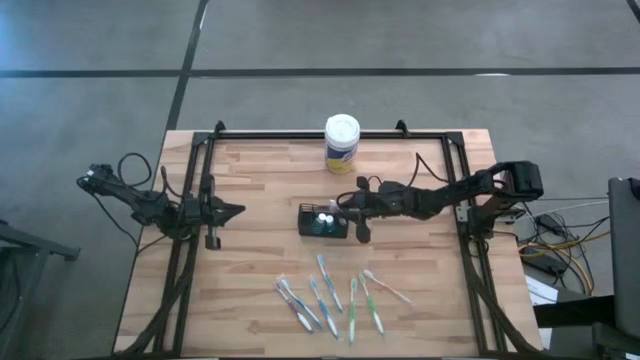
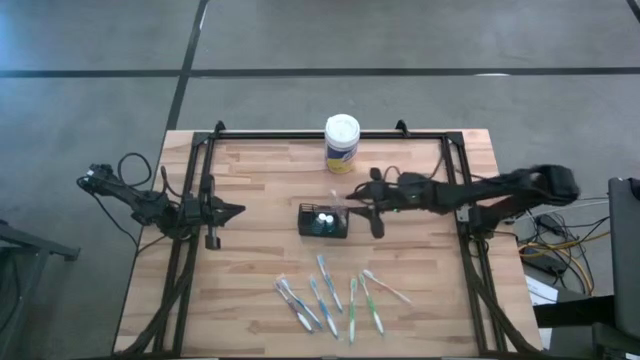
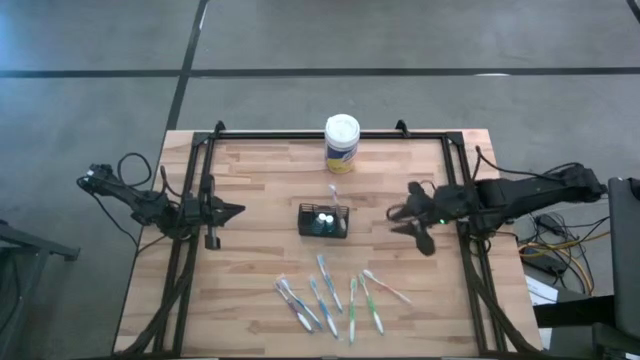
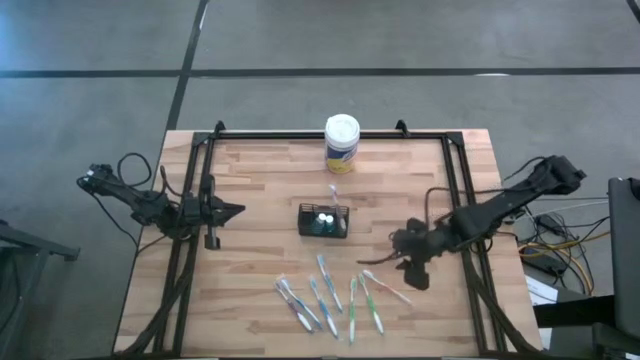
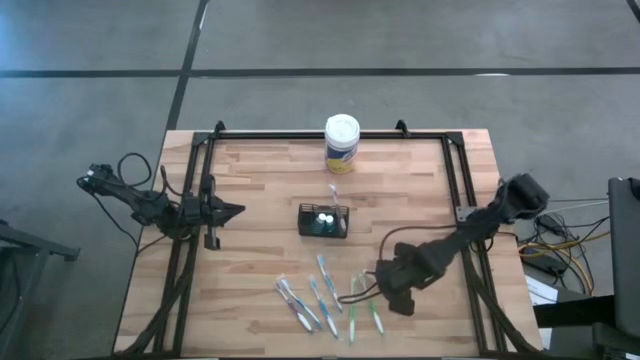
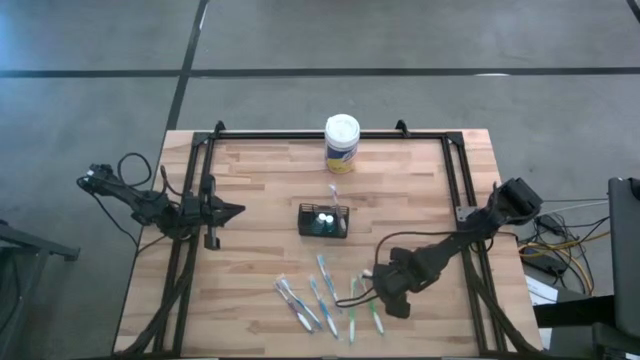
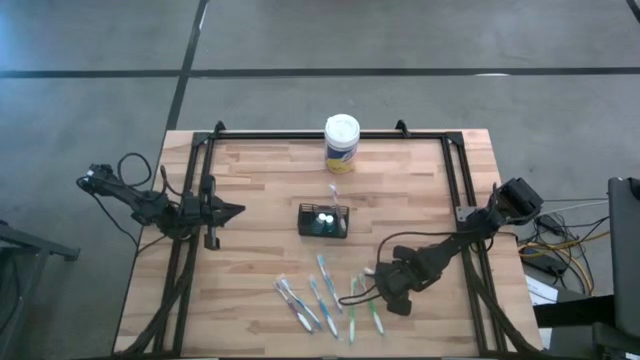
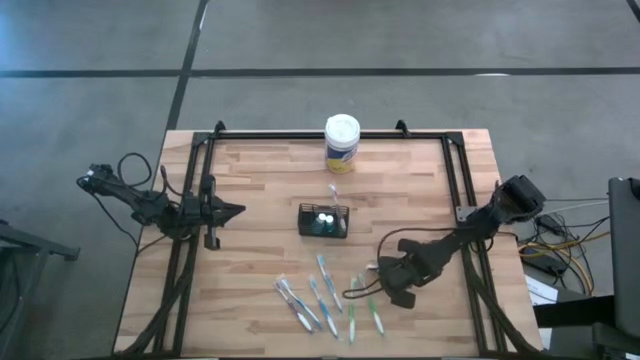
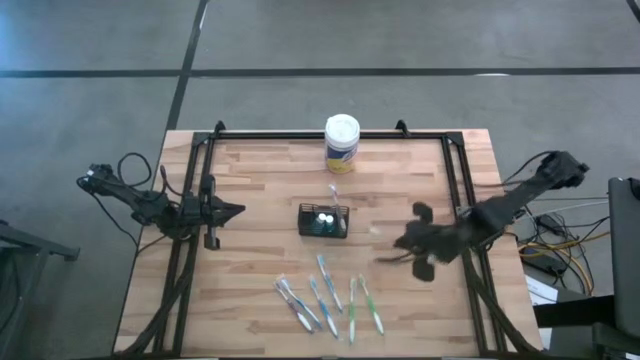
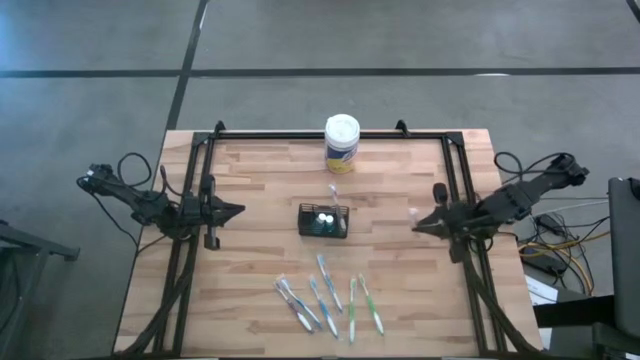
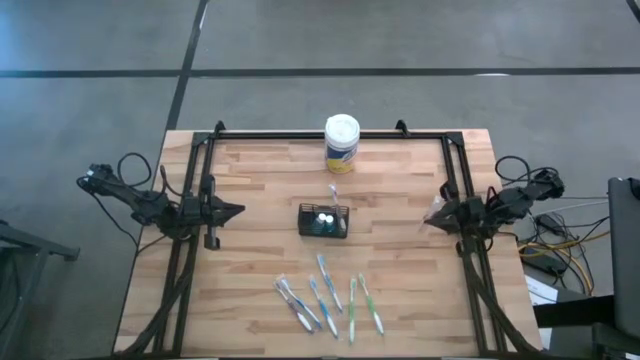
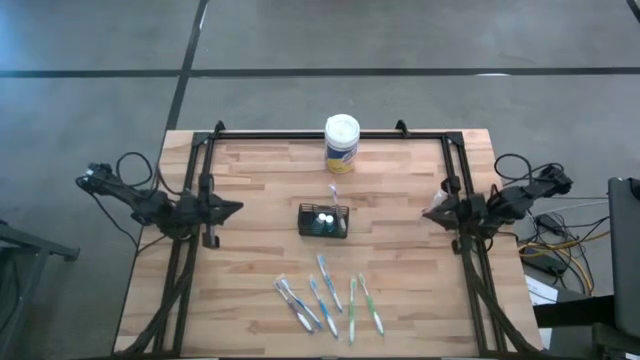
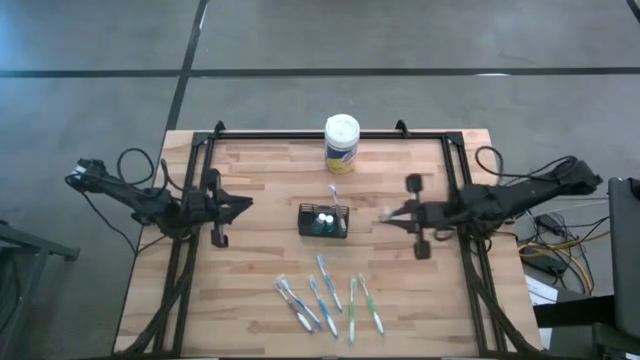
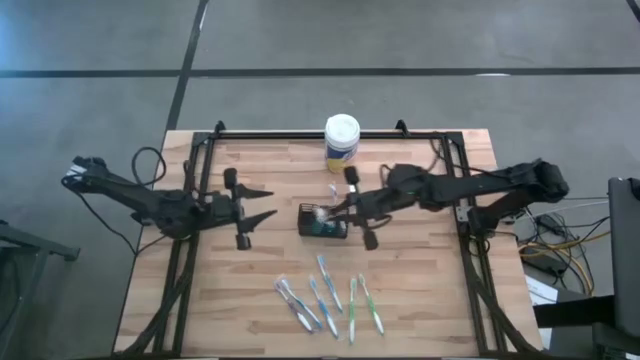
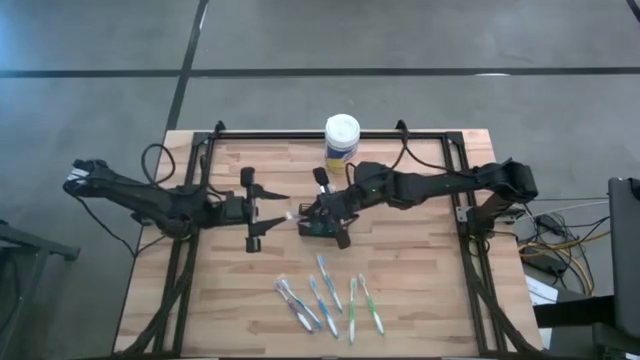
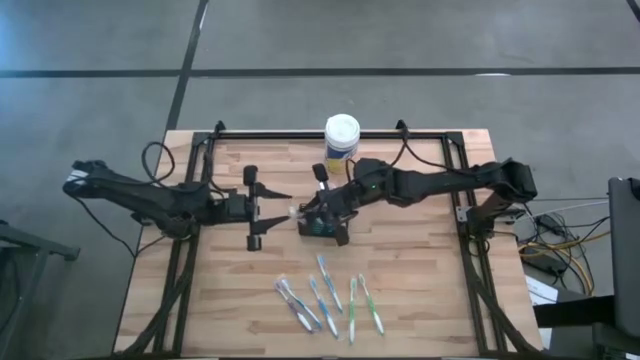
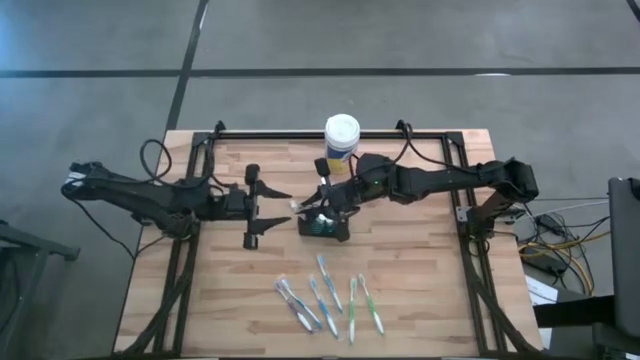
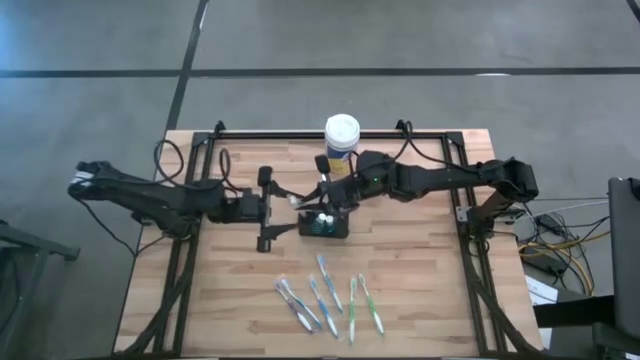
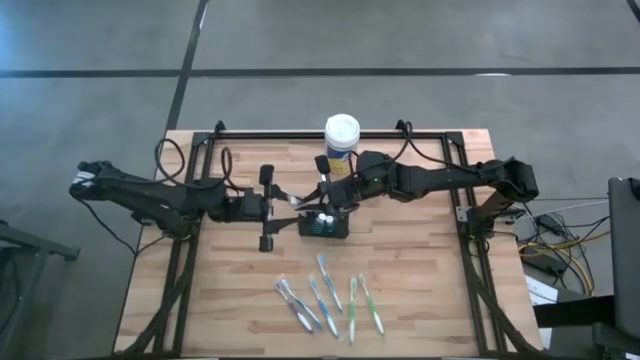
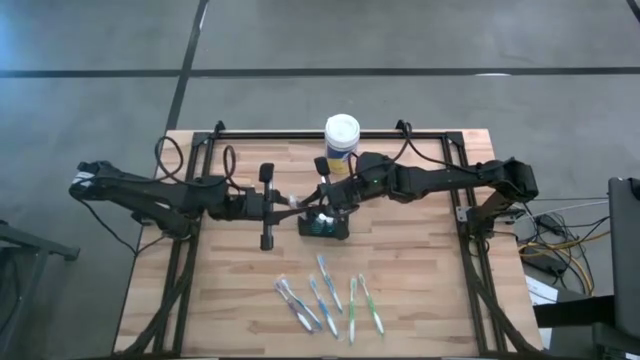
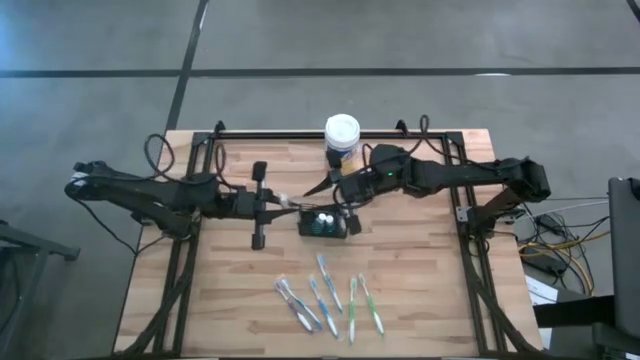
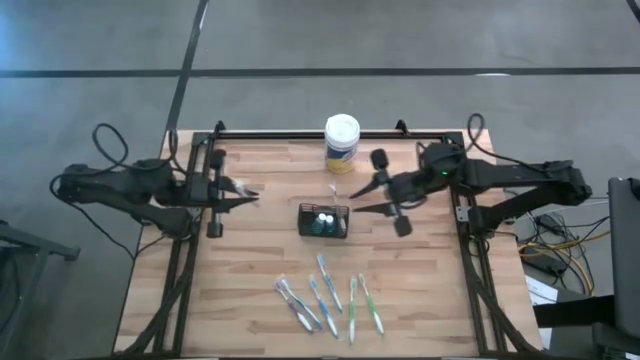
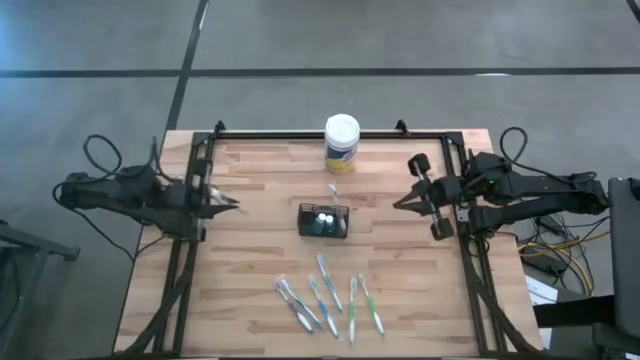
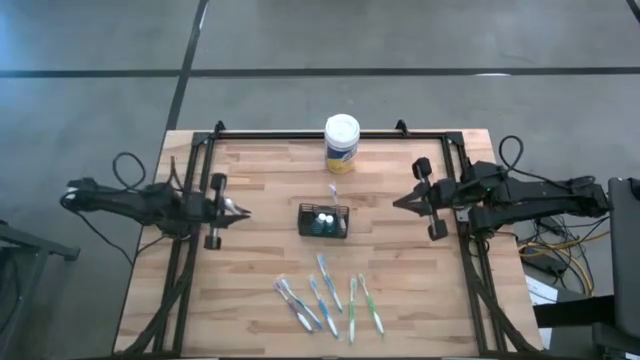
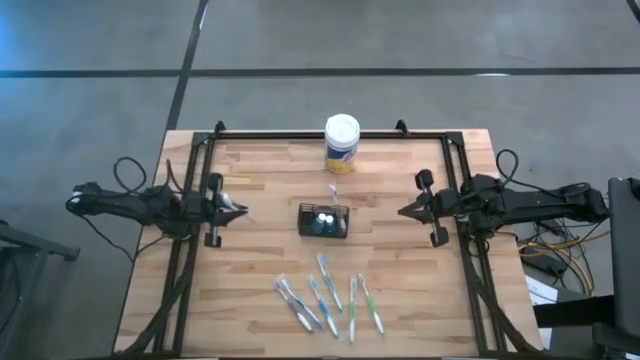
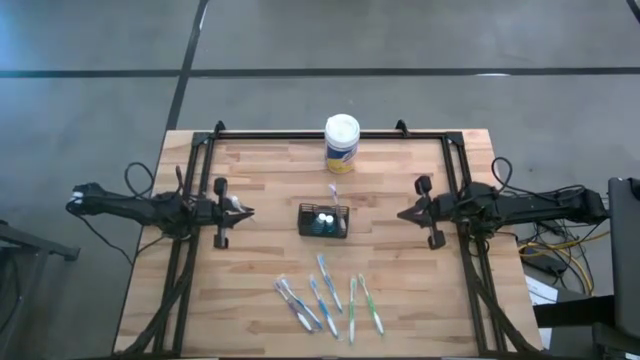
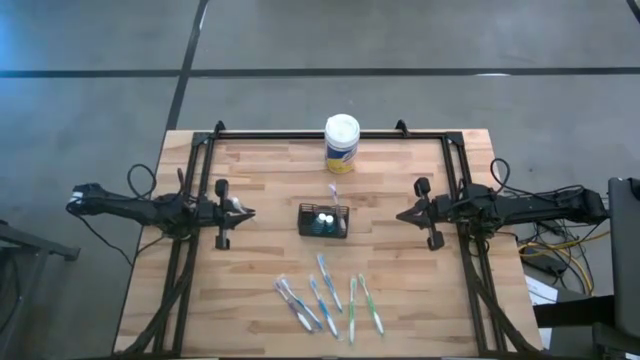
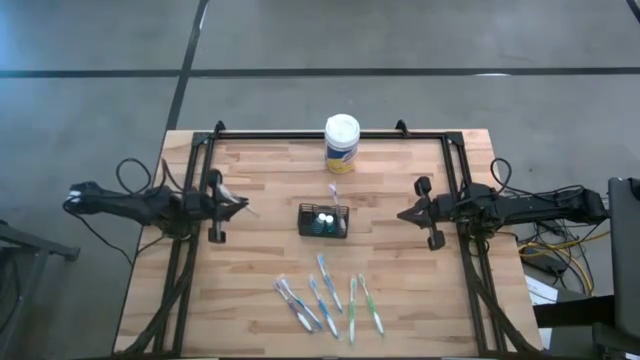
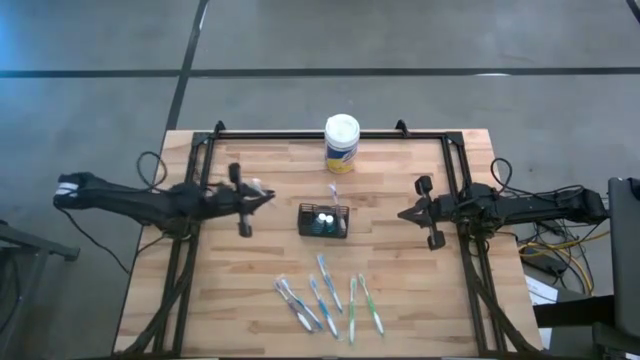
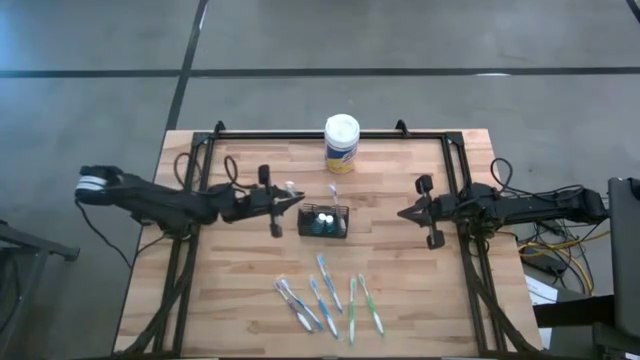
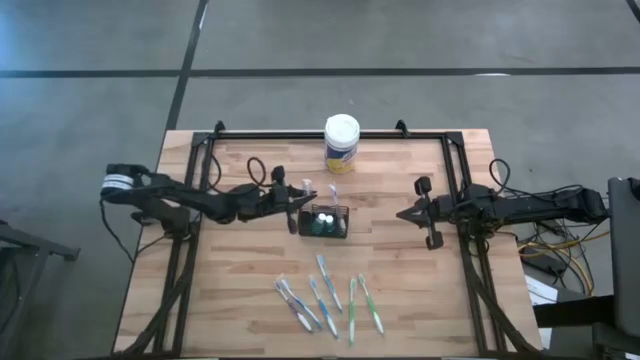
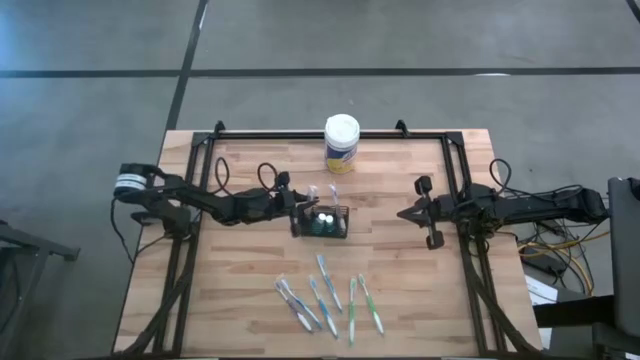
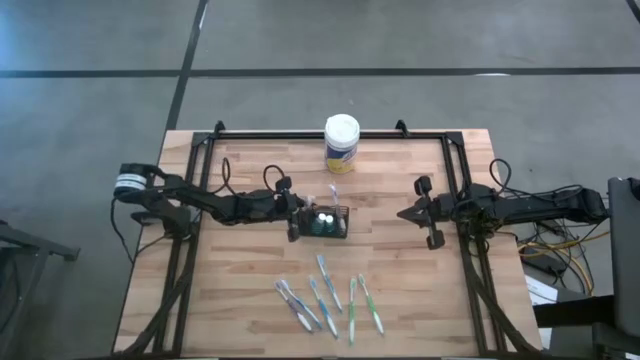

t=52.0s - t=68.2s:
Task: Pick & Place toothbrushing station
Put the orange toothbrush into the wire organizer

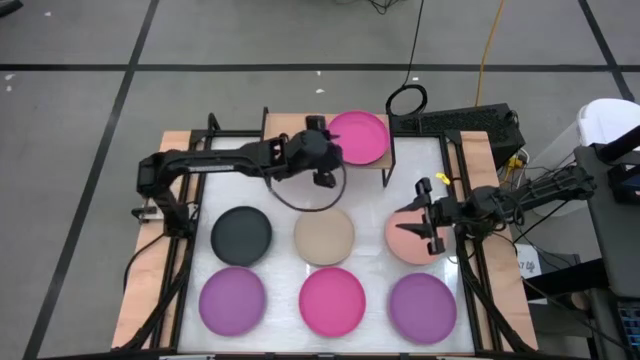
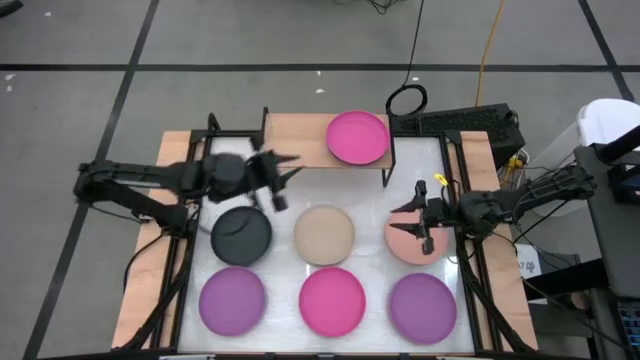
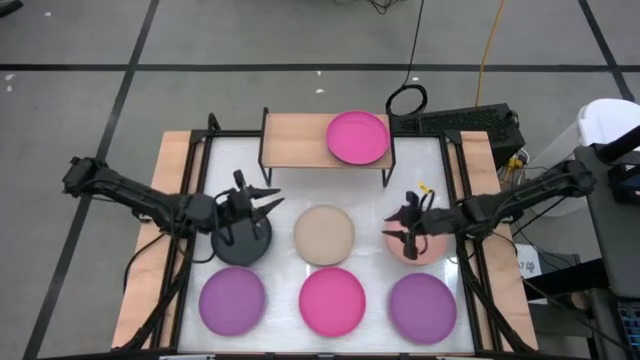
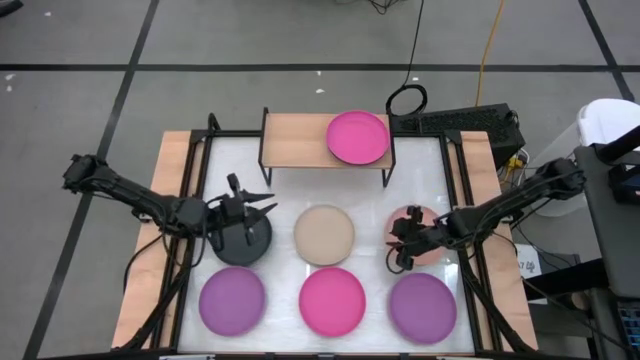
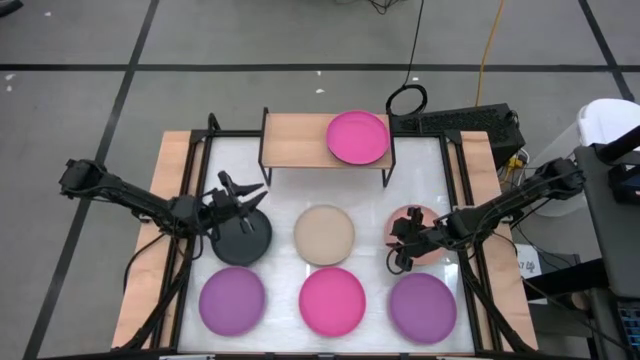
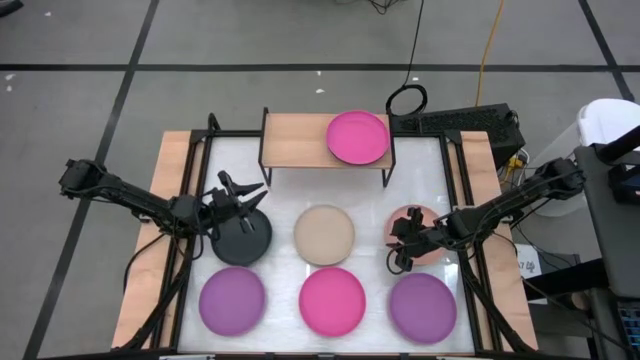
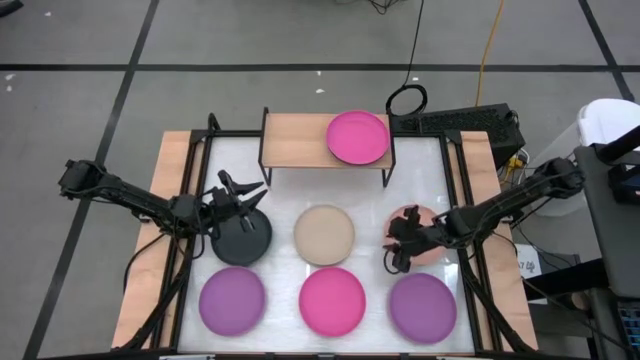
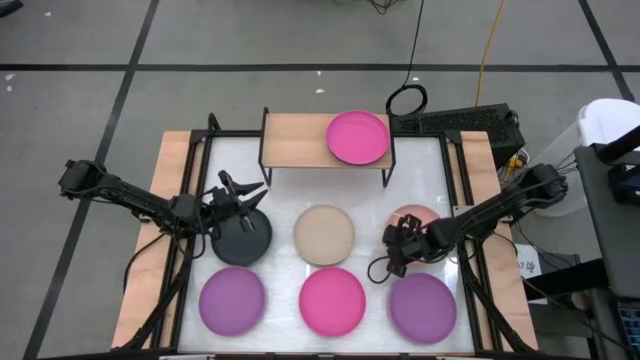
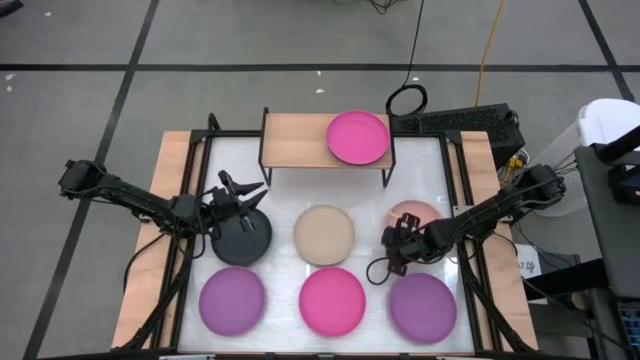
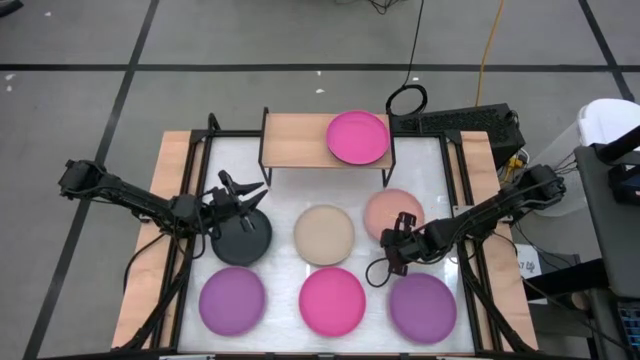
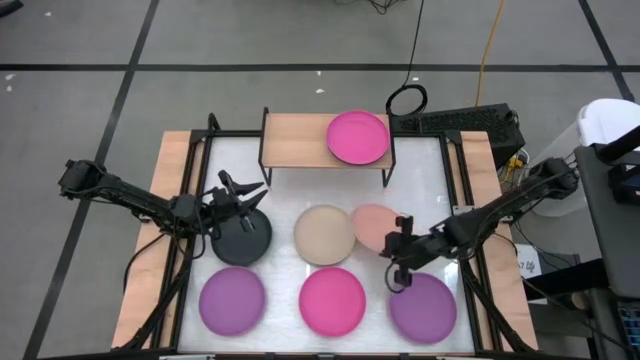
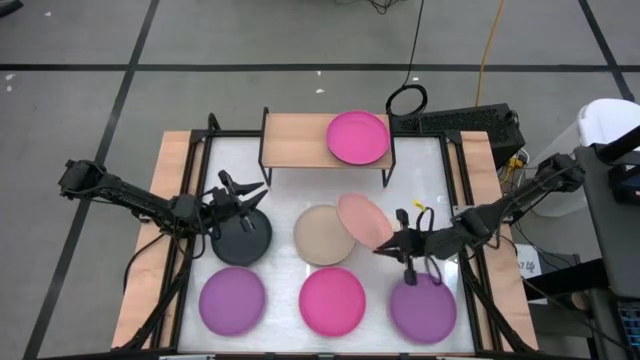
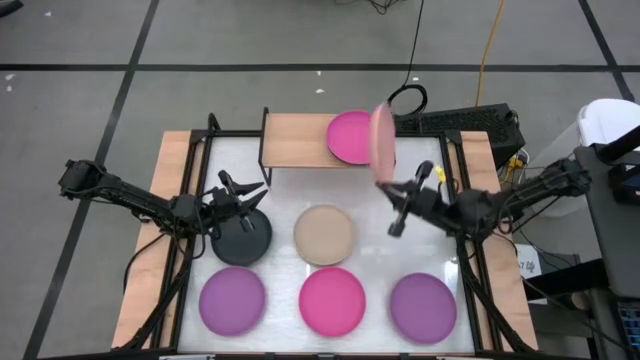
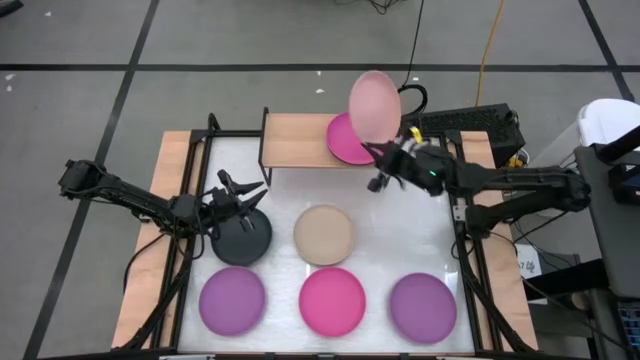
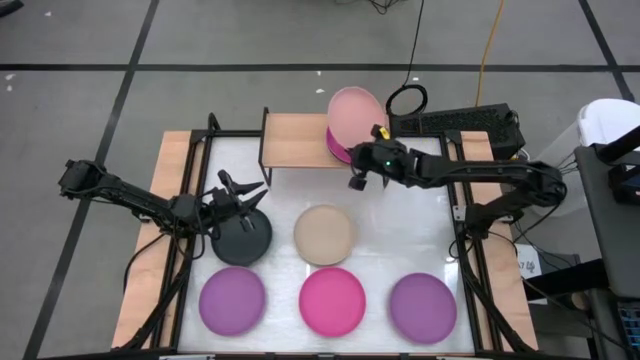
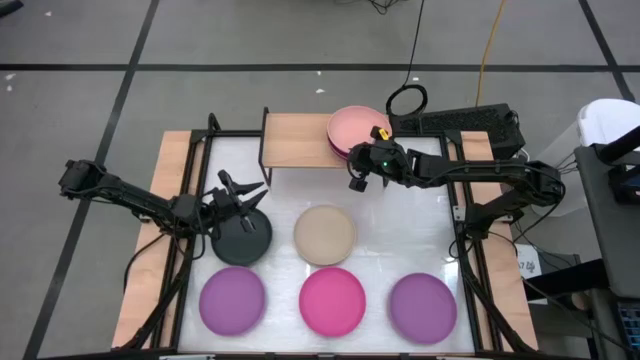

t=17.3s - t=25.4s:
Task: Place and stack plates onto a shelf
Stack the light orange plate on top of the pink plate on the shelf
